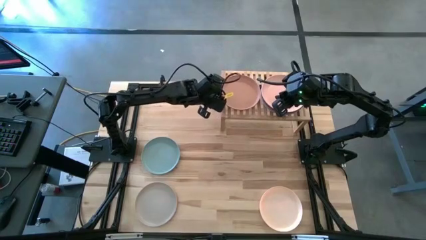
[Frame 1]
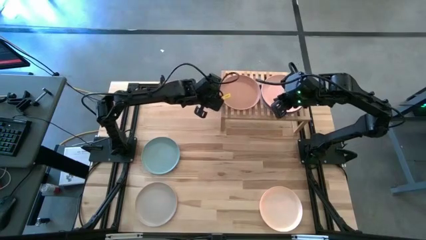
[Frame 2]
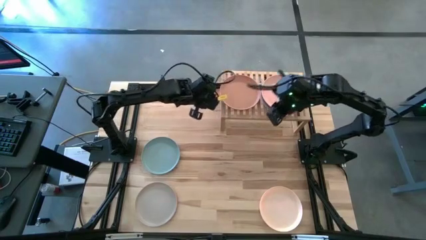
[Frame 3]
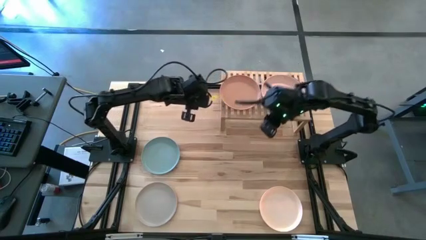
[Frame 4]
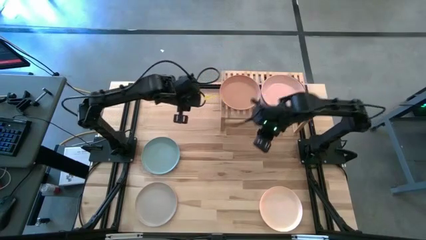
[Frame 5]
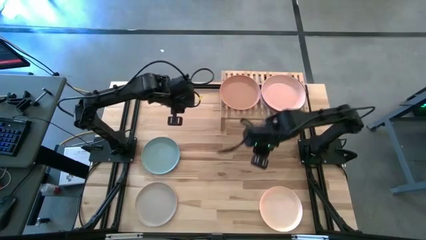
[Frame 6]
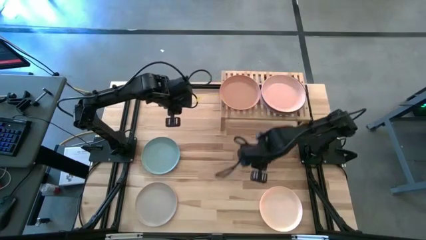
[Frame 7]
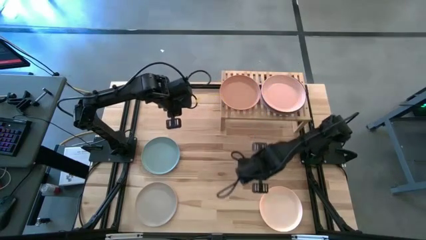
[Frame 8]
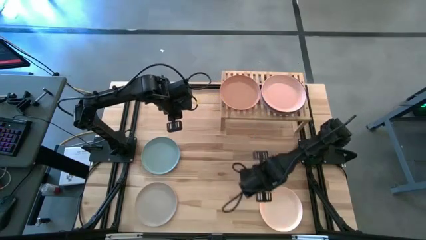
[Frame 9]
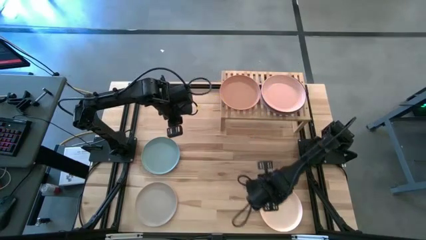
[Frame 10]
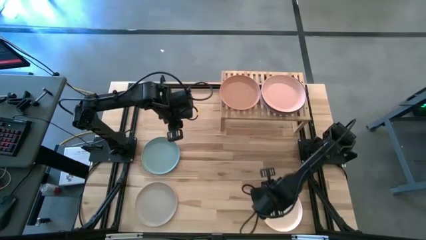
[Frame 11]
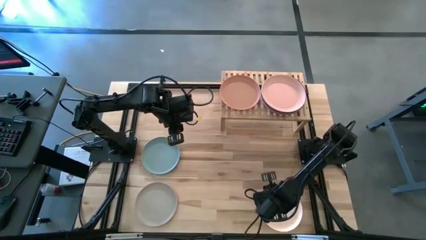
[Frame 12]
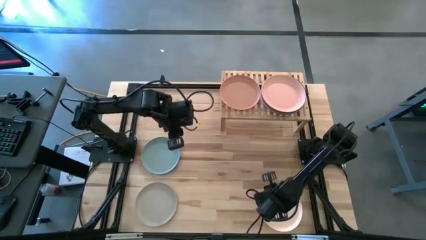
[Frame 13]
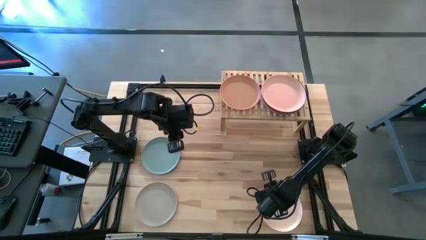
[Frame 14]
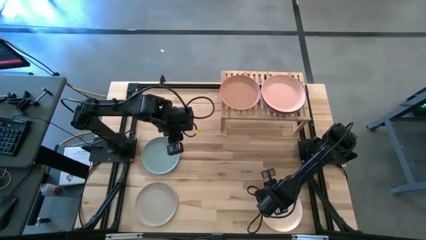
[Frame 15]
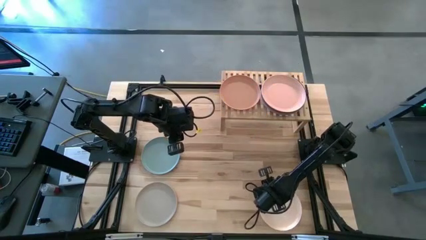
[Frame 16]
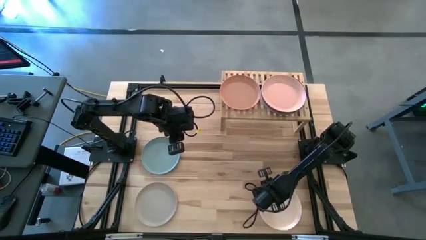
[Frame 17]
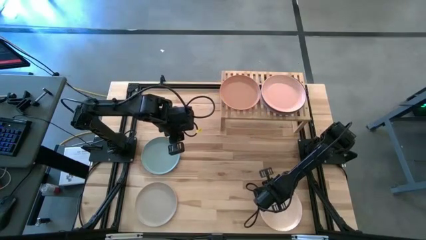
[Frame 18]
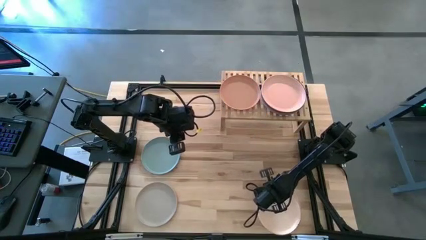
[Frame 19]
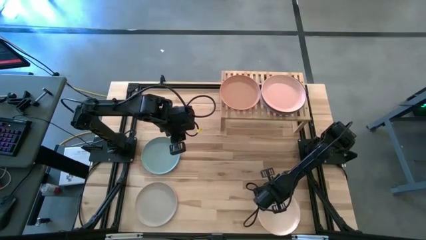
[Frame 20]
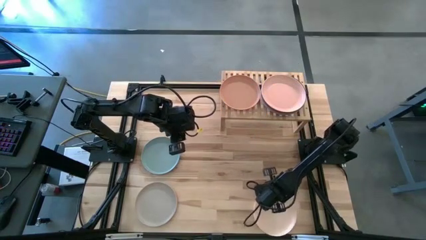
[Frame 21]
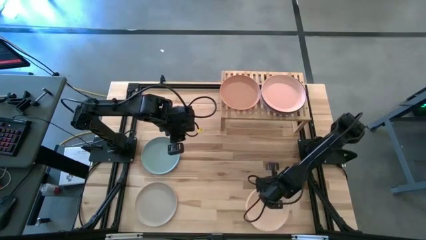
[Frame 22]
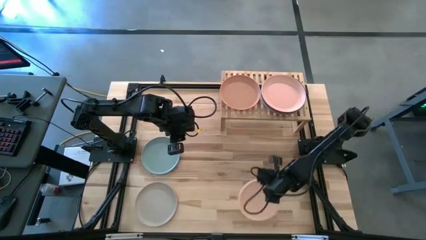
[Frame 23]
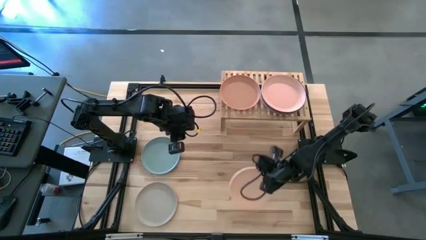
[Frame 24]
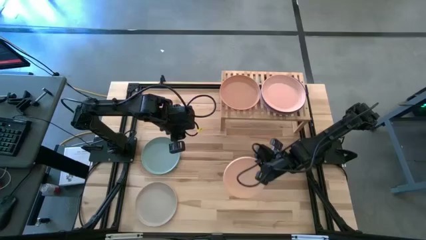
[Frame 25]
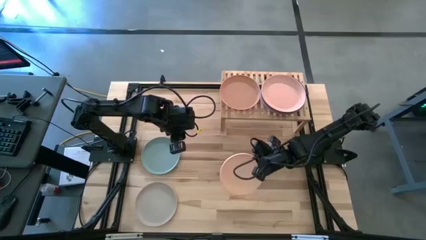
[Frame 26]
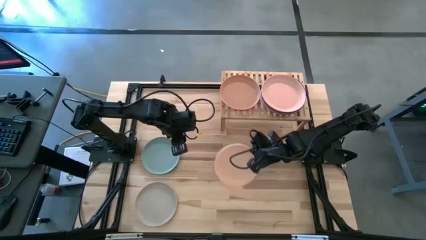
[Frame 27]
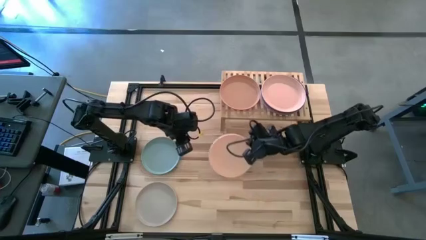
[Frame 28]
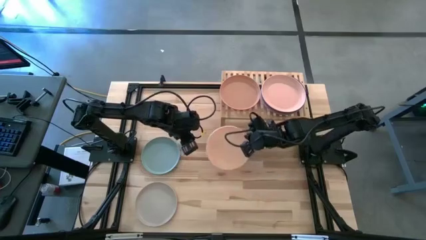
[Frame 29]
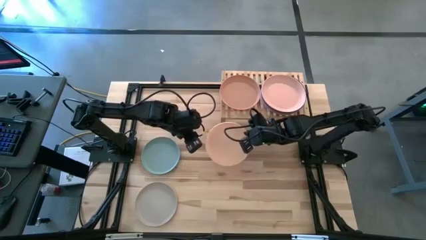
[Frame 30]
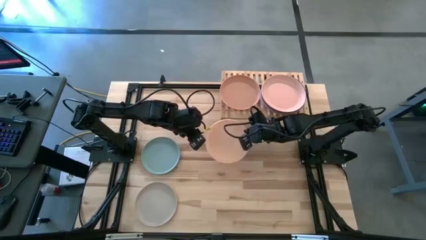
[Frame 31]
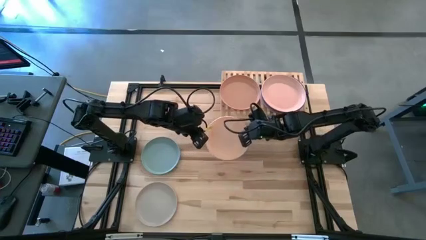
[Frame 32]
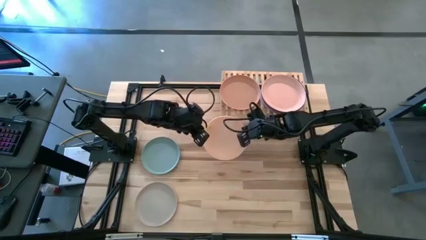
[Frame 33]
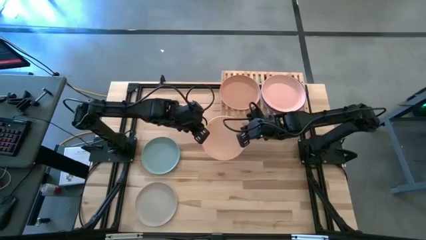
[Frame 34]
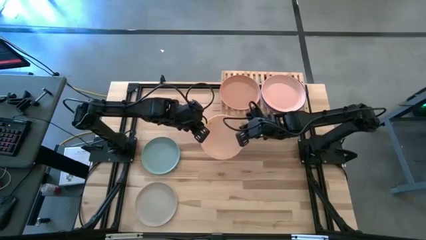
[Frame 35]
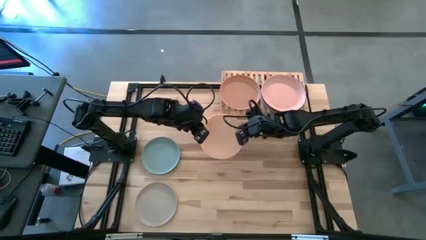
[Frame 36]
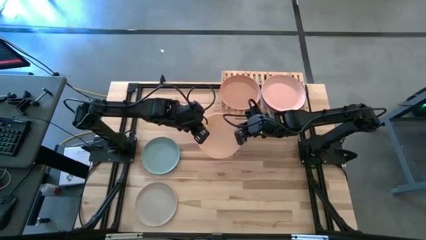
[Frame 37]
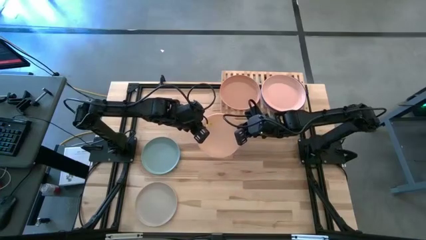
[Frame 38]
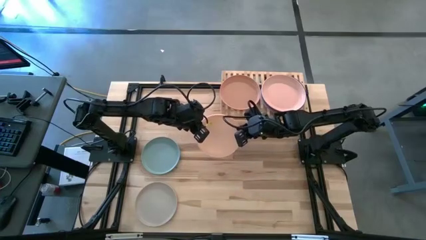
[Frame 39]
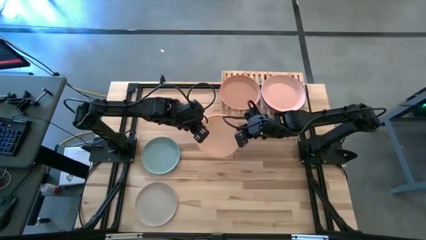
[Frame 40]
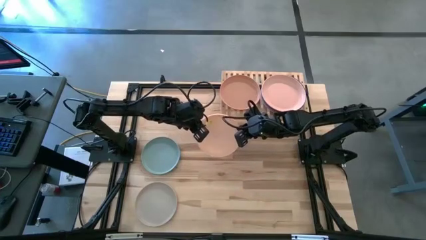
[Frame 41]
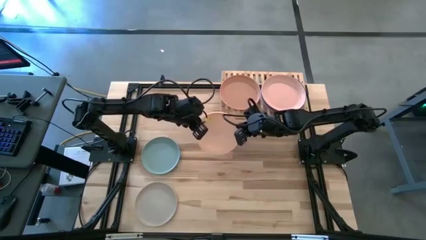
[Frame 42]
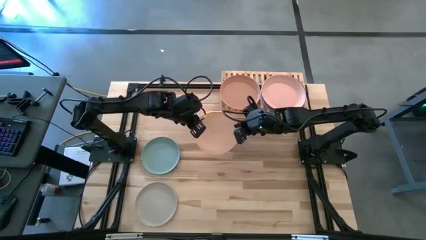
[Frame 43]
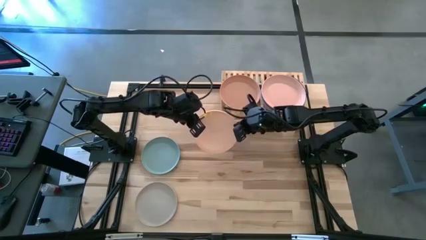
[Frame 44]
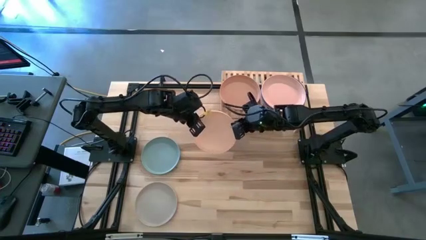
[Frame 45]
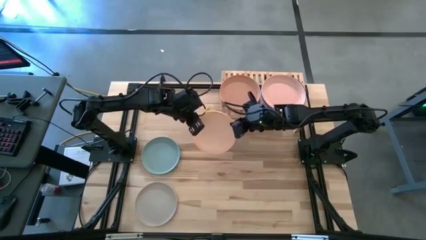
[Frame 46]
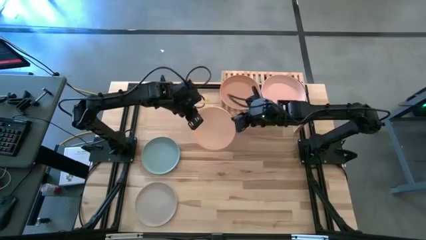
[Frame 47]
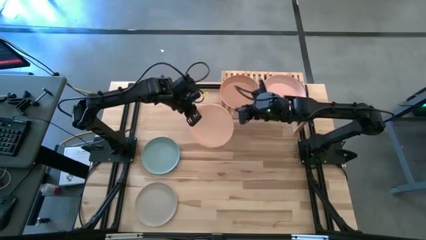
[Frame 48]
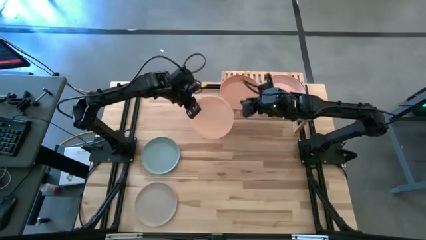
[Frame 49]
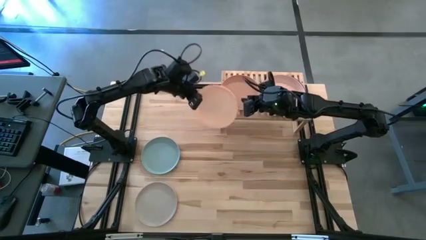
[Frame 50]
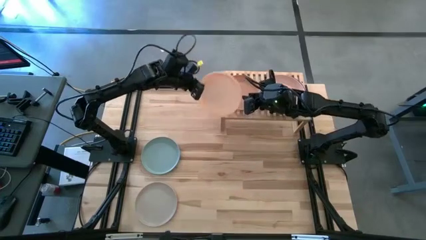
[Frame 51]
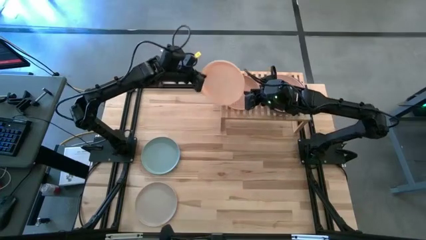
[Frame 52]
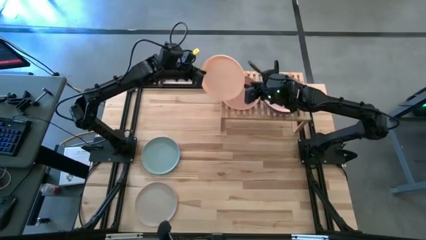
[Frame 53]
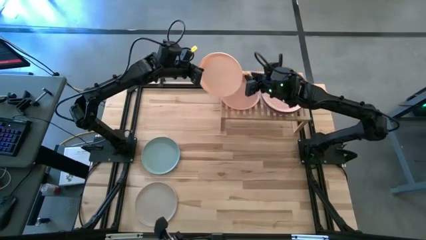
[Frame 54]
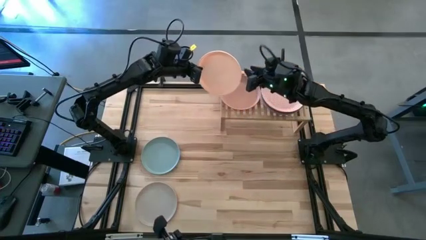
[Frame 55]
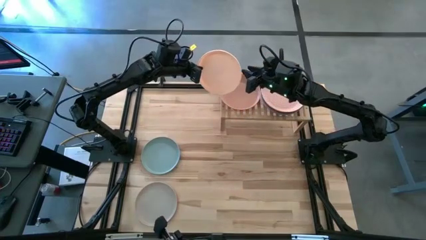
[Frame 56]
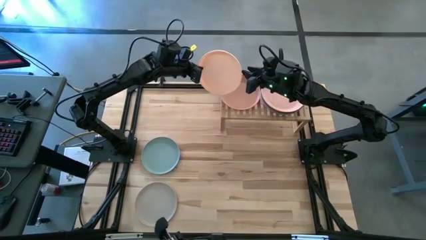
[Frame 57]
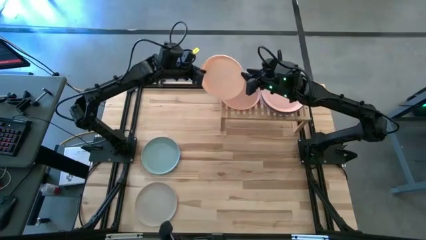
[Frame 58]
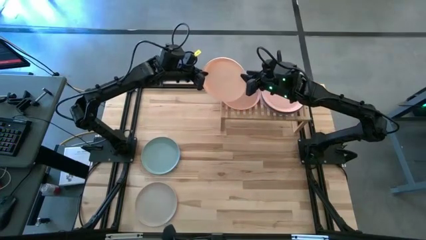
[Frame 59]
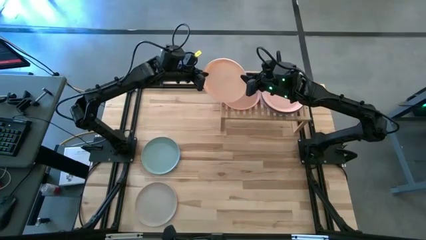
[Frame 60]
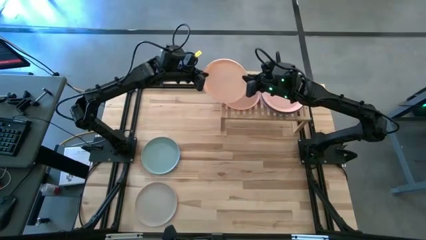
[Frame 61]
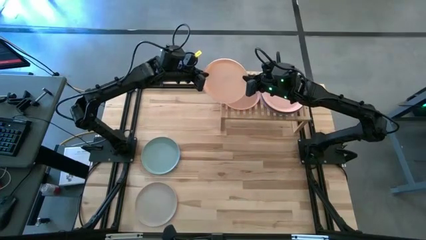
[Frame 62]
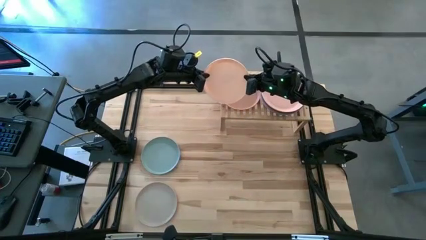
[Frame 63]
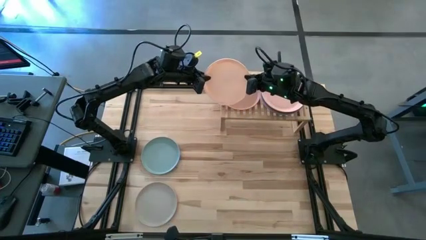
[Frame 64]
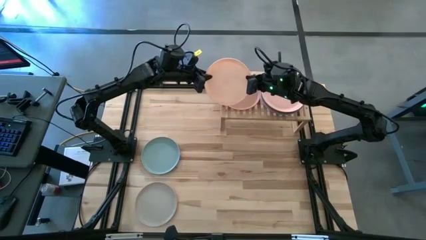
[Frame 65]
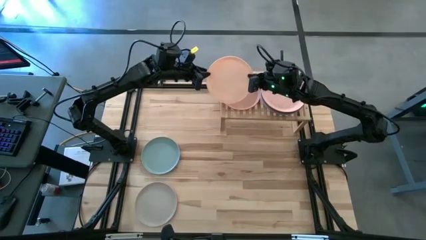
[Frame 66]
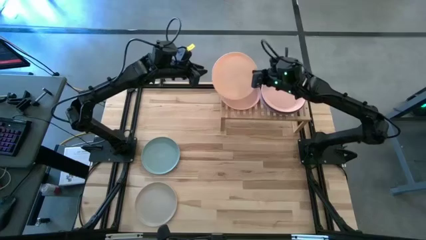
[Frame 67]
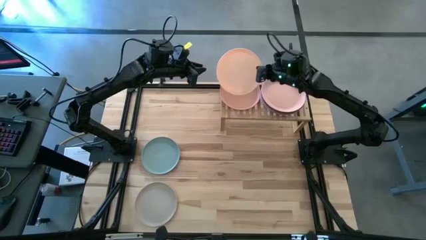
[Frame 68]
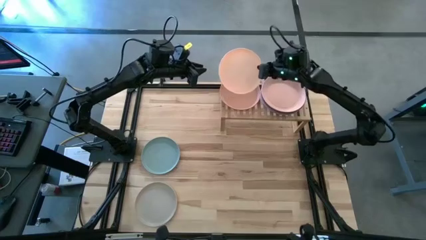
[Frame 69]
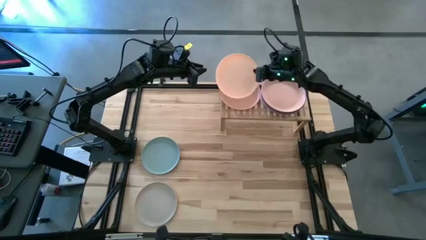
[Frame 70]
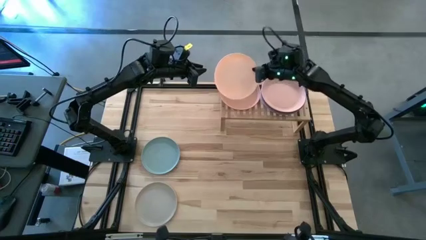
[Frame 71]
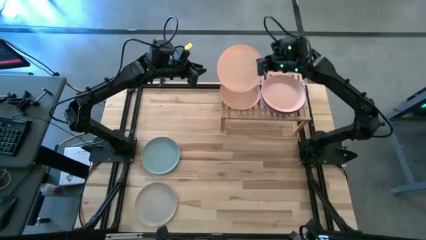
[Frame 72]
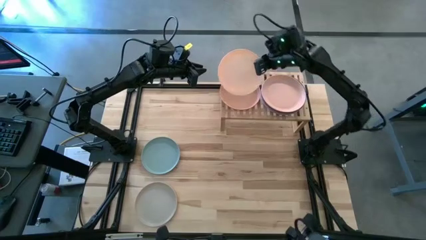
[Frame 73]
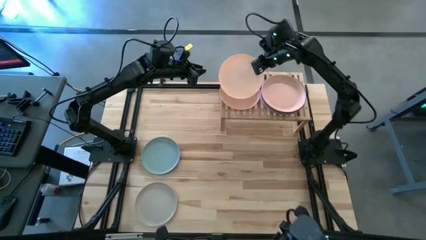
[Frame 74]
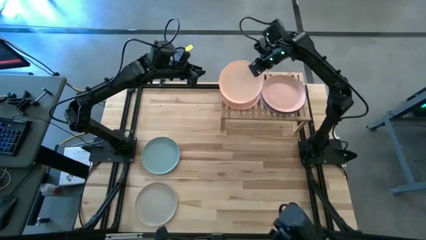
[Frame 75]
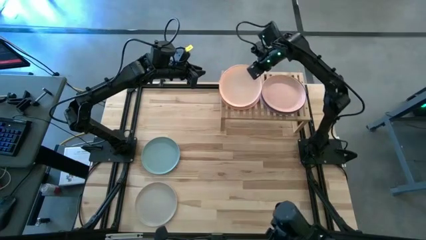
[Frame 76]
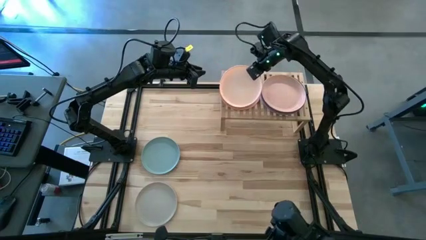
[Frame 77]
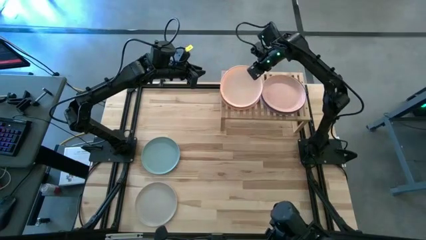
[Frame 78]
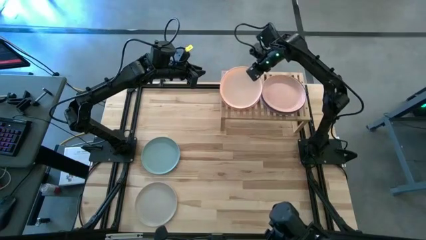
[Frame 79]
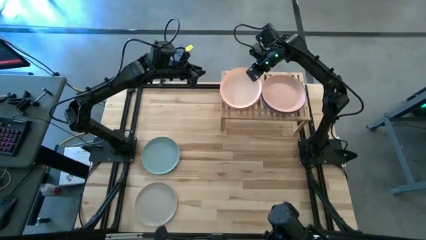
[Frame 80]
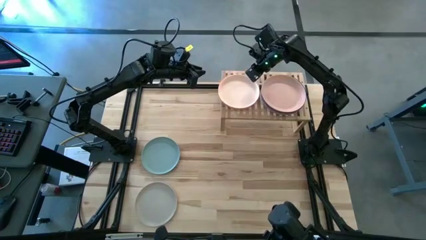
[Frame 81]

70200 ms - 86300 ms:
Task: Place and stack plates onto a shelf
Stack the white plate on the light orange plate on the shelf
